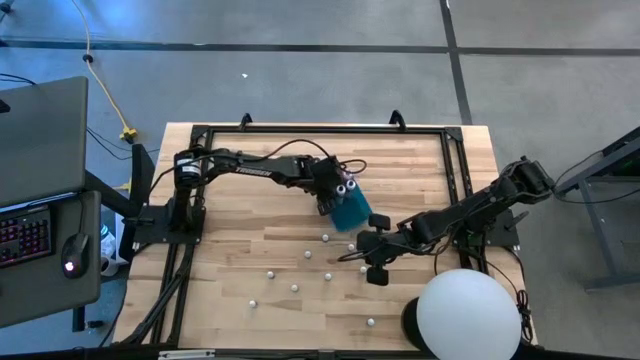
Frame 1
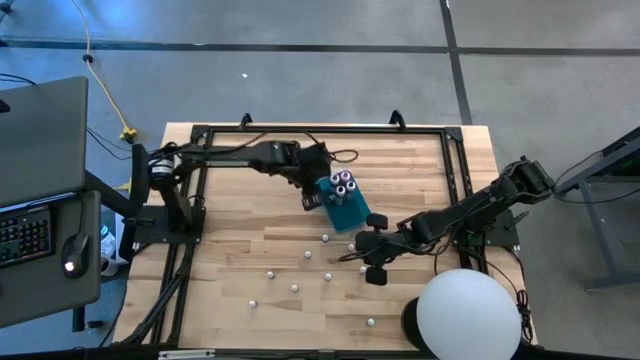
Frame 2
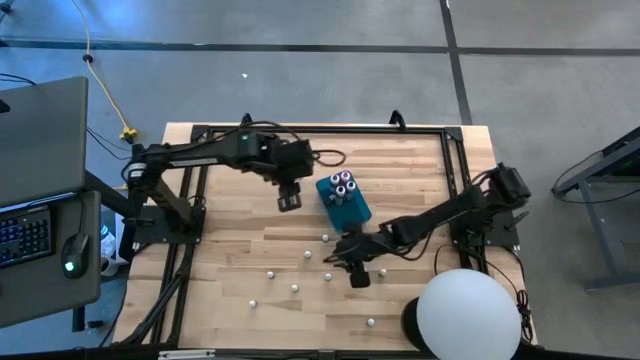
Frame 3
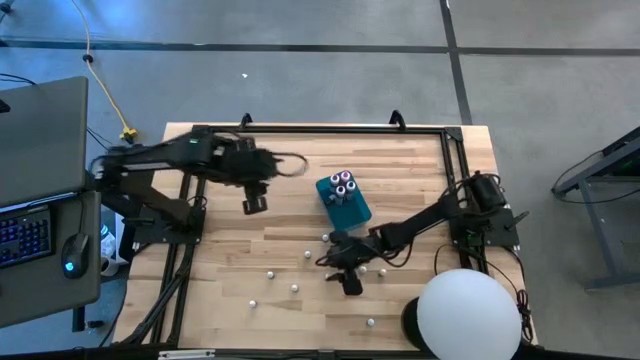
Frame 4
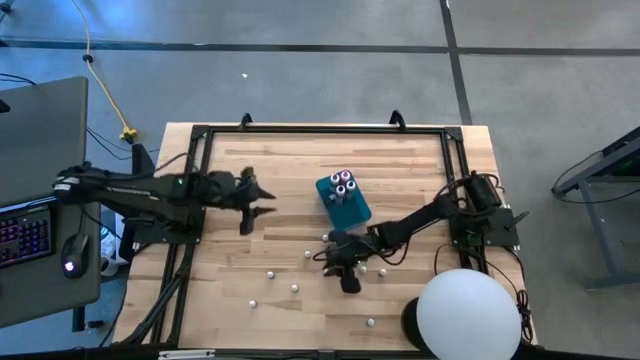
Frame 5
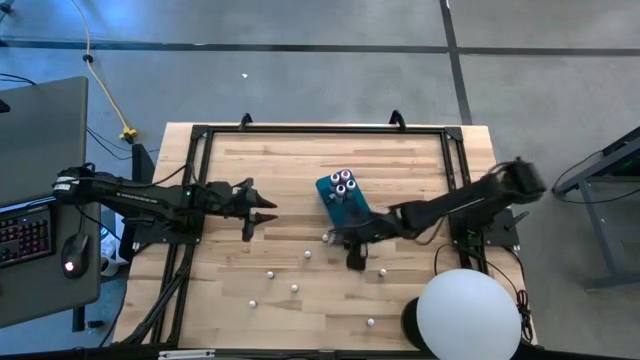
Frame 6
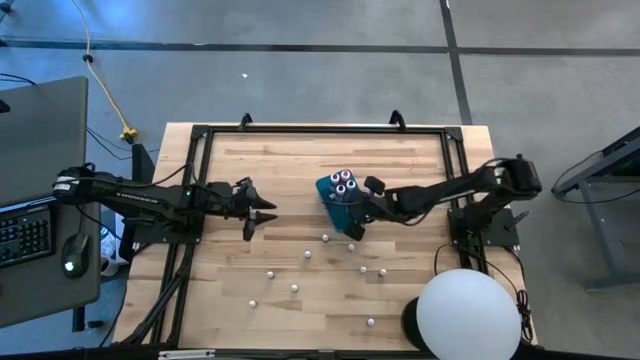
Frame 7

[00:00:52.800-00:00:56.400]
Task: Pick & Place food coloring
Put the small red food coloring bottle into the blue container

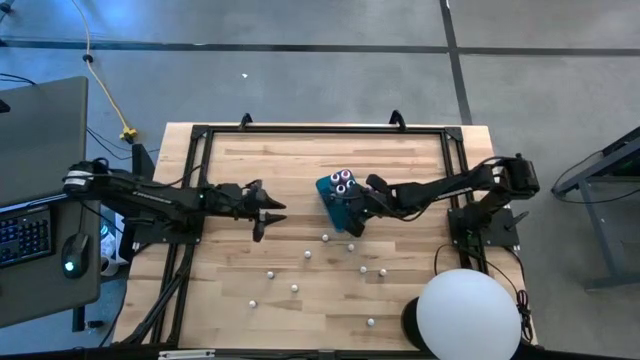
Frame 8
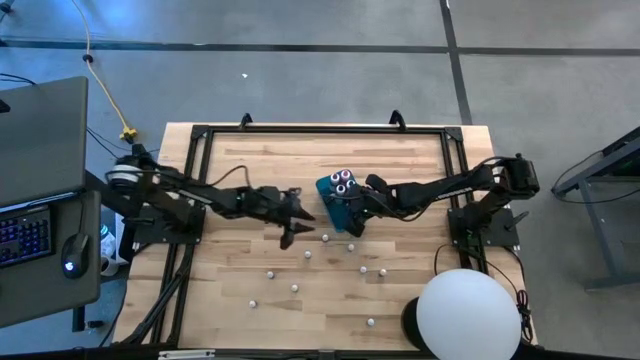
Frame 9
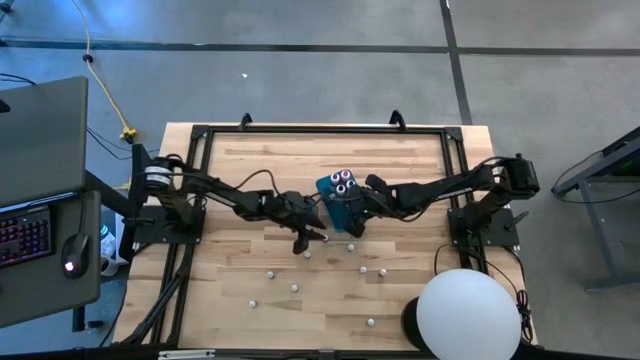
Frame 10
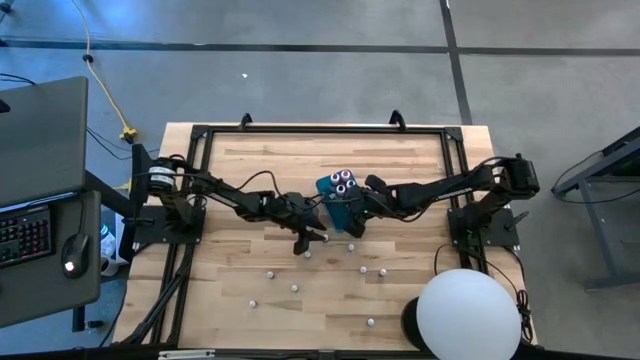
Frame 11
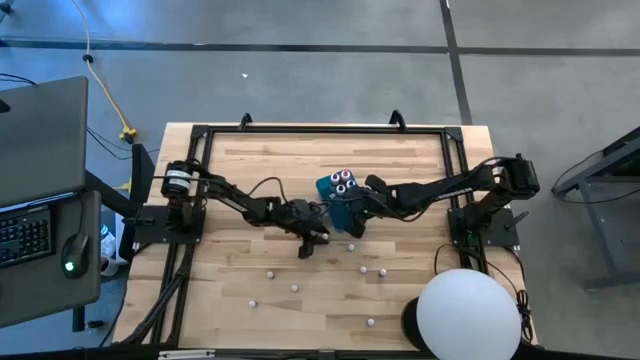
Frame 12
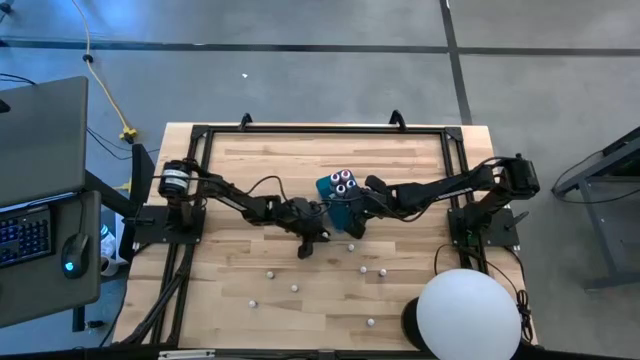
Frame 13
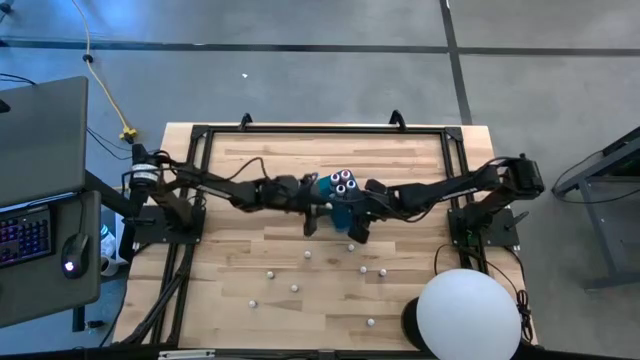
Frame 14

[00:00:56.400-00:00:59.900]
Put the small black food coloring bottle into the blue container

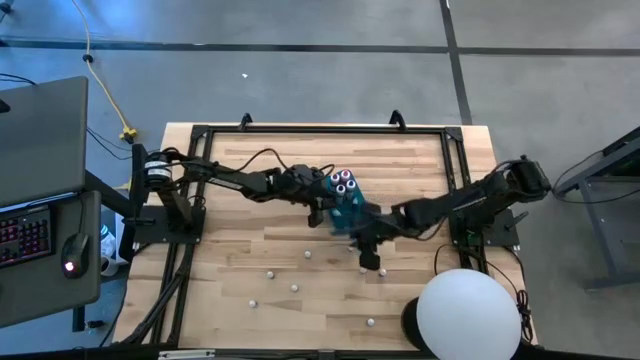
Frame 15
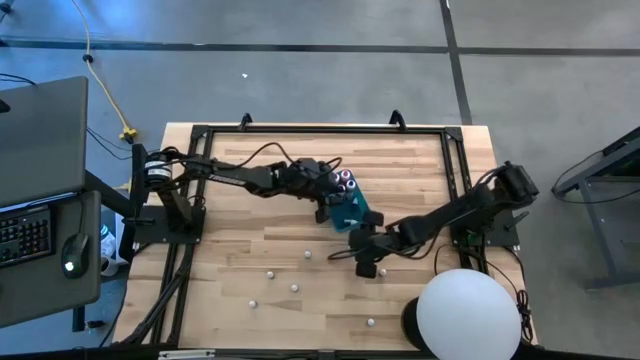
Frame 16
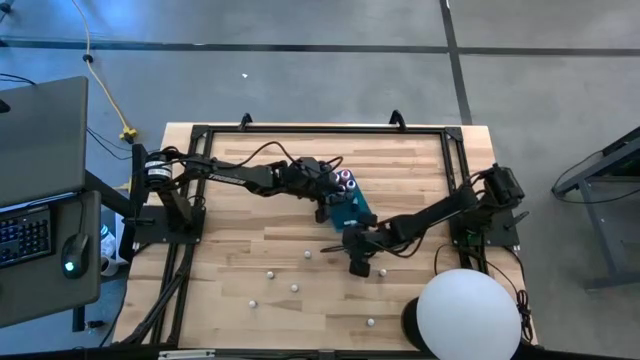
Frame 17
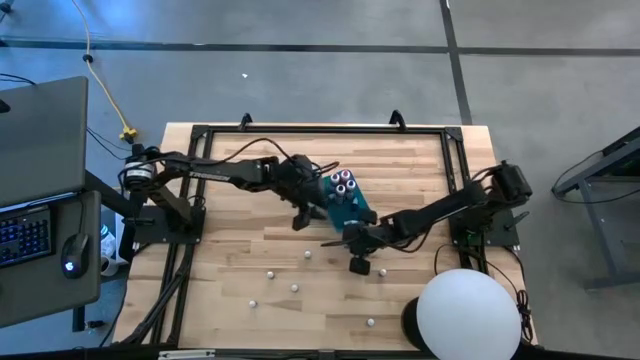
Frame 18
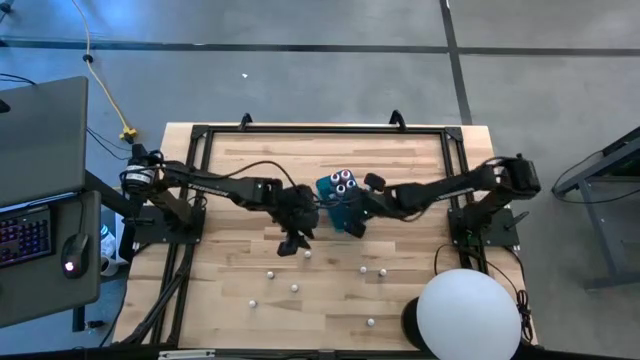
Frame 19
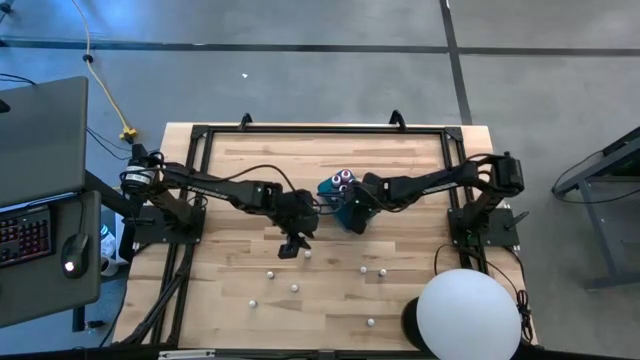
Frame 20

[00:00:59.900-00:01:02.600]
Put the small blue food coloring bottle into the blue container

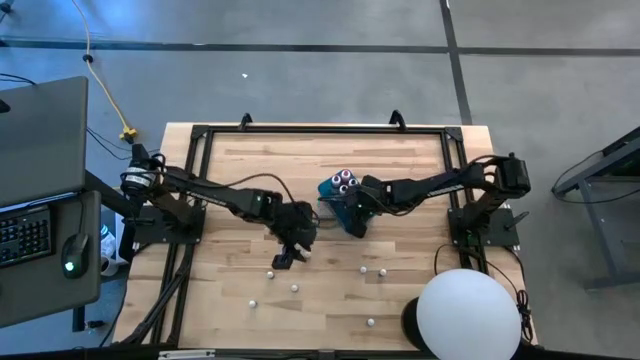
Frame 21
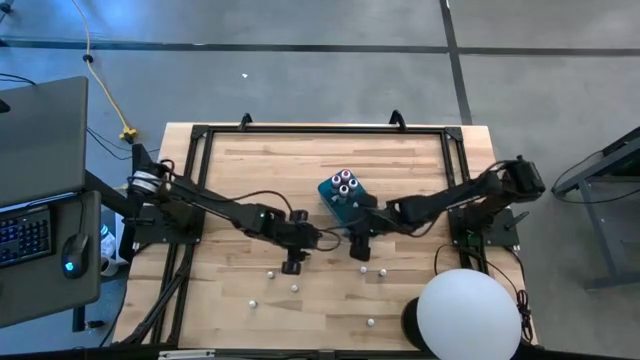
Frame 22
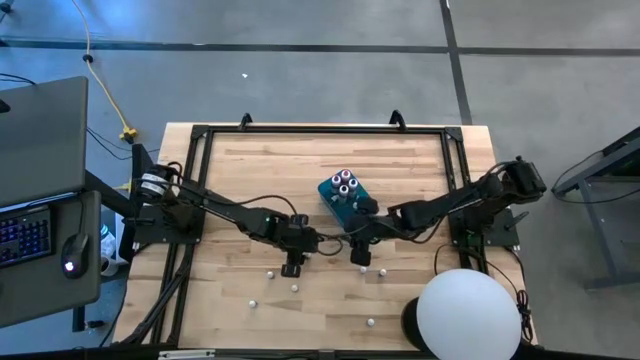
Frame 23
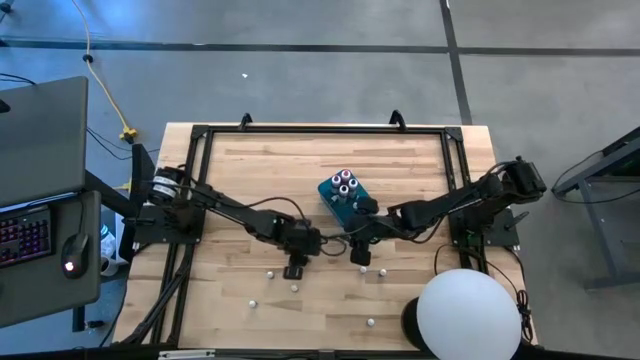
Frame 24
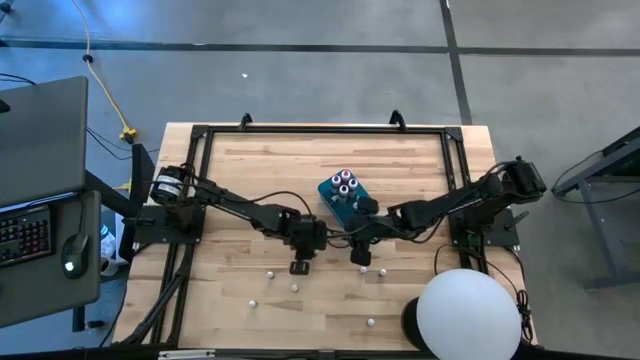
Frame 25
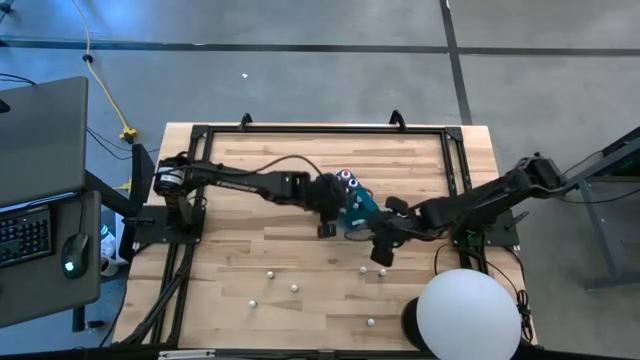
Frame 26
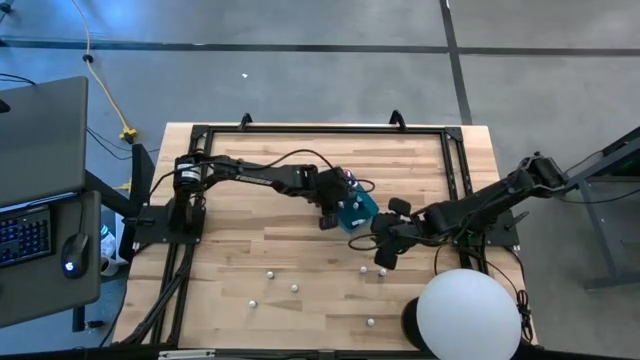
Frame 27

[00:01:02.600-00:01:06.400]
Put the top small green food coloring bottle into the blue container

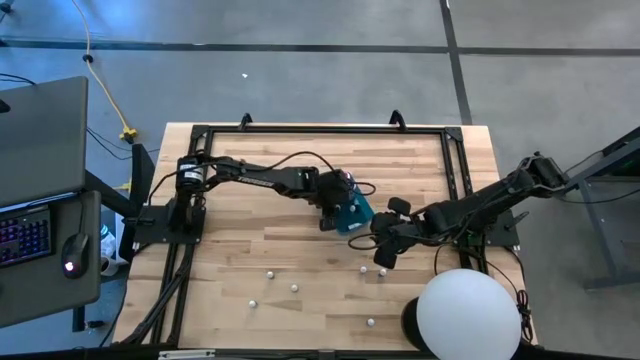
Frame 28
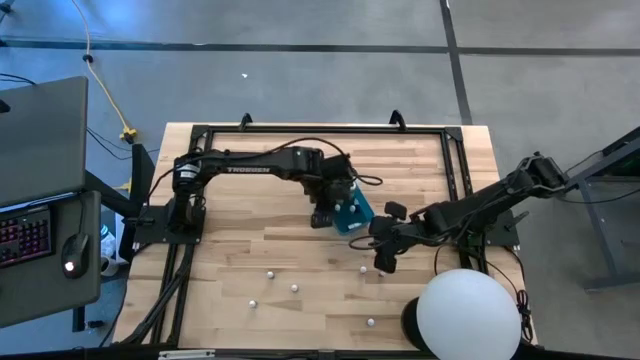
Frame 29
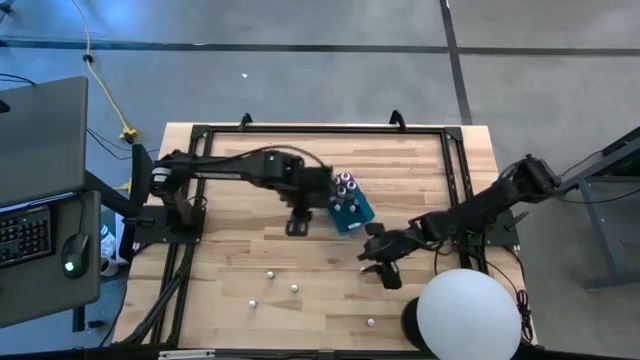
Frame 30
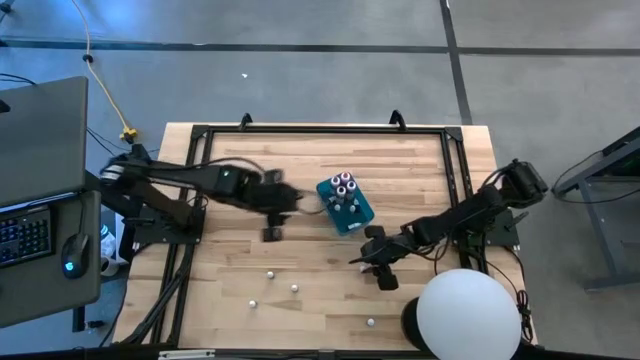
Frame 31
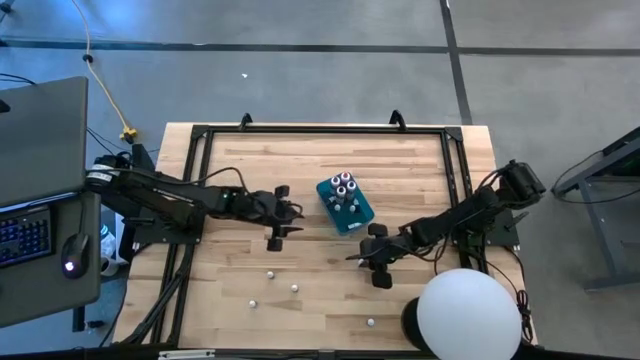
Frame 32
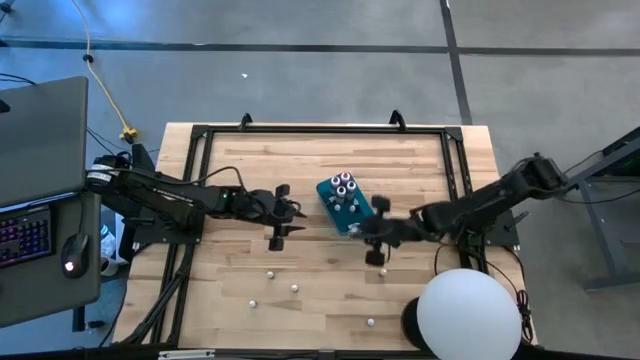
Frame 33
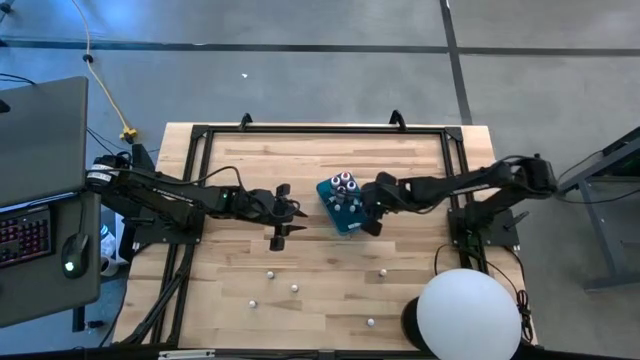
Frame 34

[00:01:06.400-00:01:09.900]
Put the small blue food coloring bottle into the blue container

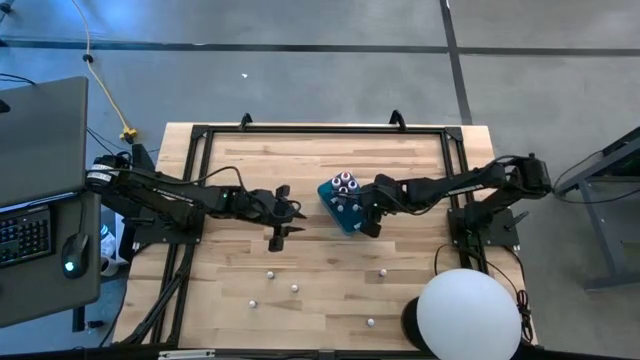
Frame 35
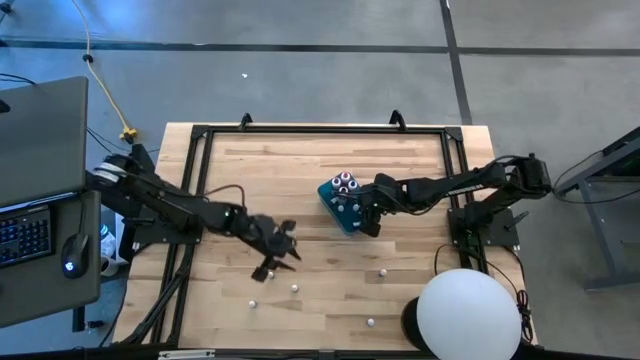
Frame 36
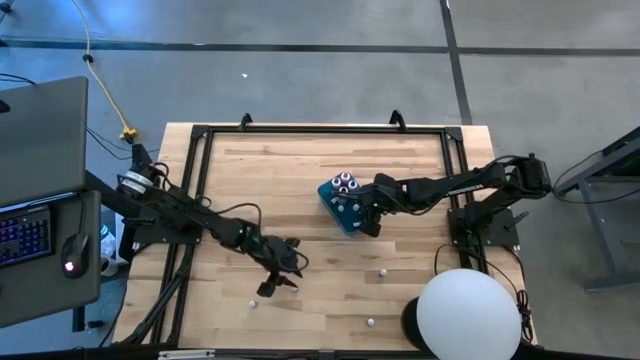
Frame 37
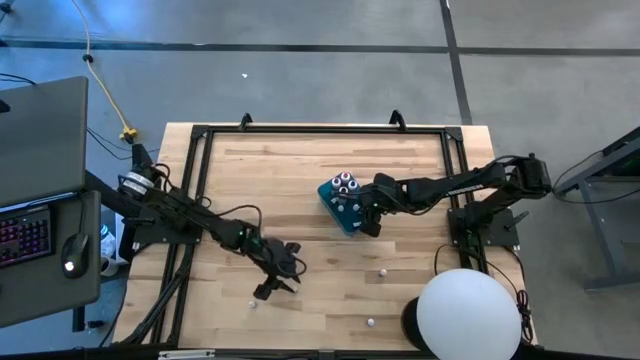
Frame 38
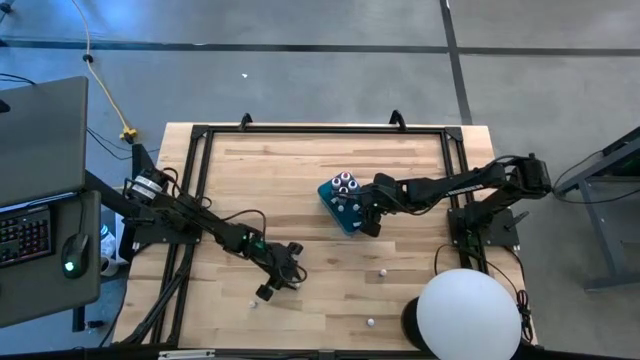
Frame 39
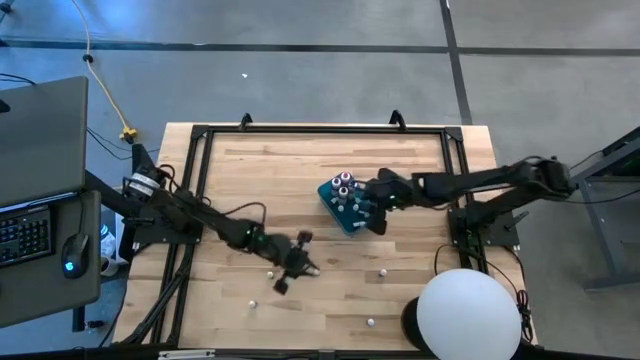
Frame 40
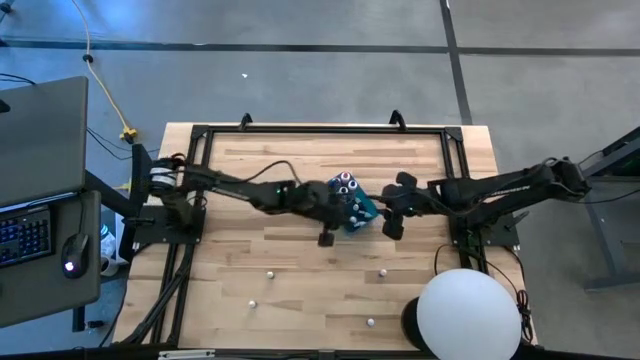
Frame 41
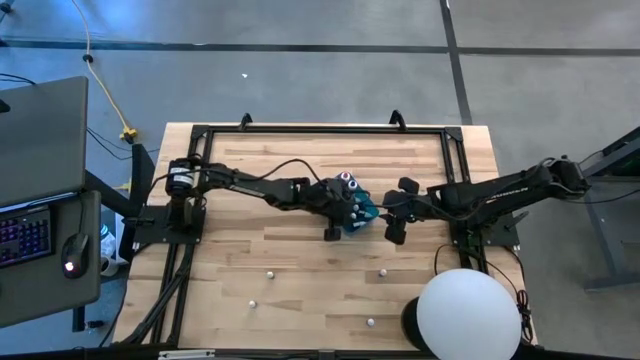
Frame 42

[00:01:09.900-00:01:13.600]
Put the small green food coloring bottle into the blue container

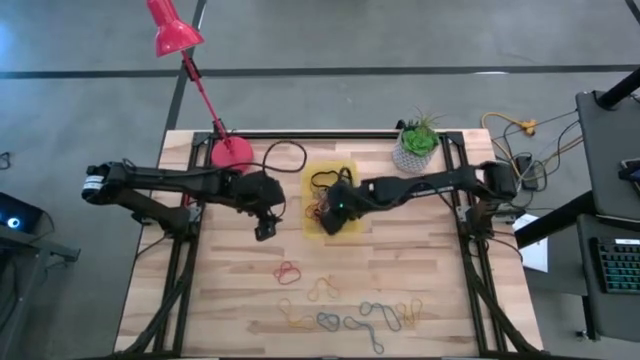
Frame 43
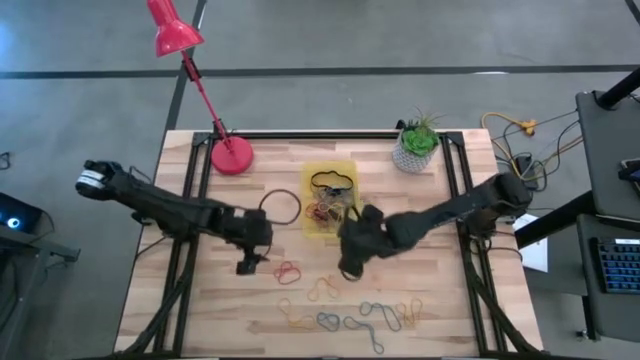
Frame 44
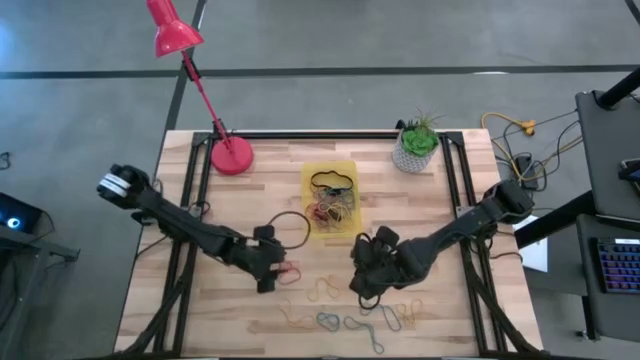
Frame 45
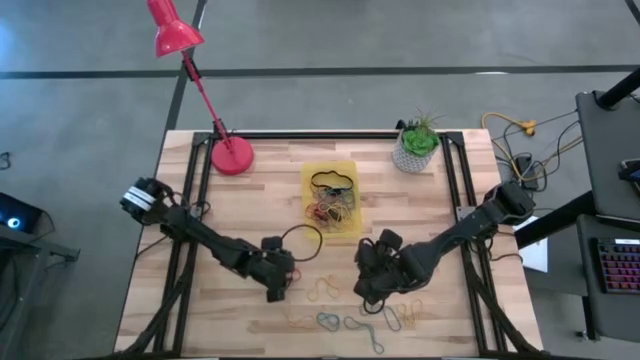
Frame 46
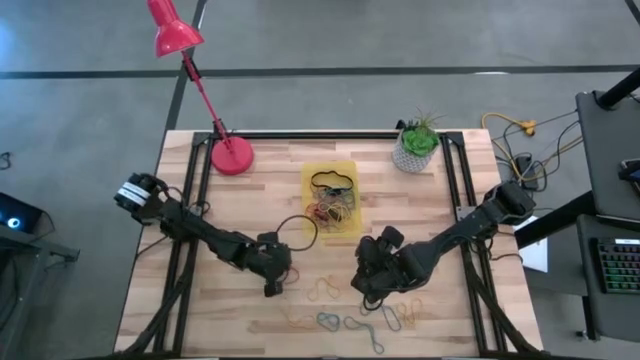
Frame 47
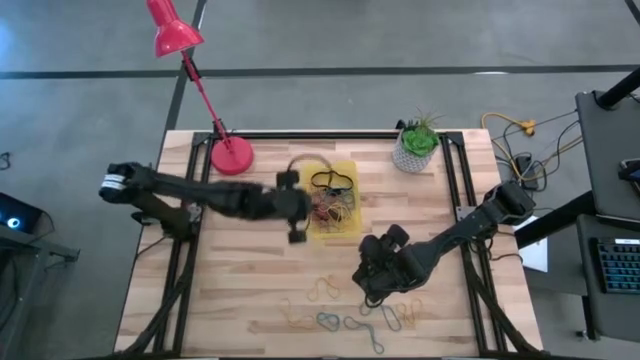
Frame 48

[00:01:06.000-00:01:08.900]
Task: Pick and place rubber bands into bin
Put the red rubber band into the yellow bin
